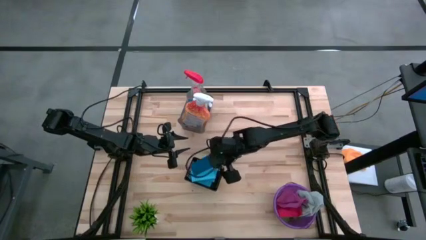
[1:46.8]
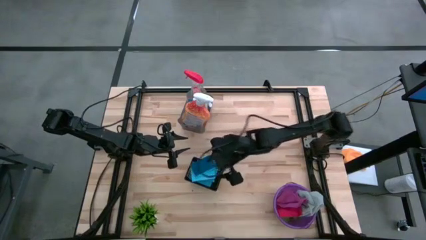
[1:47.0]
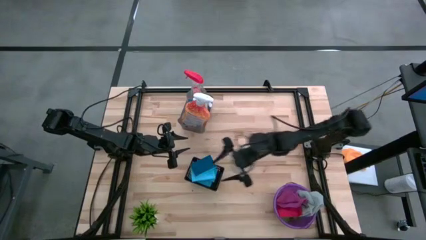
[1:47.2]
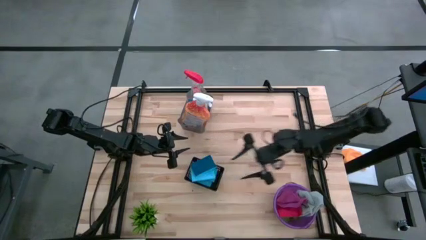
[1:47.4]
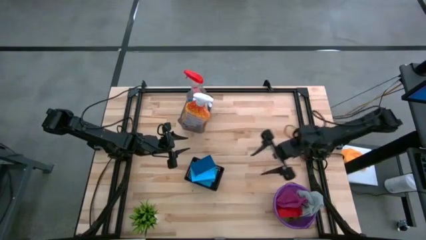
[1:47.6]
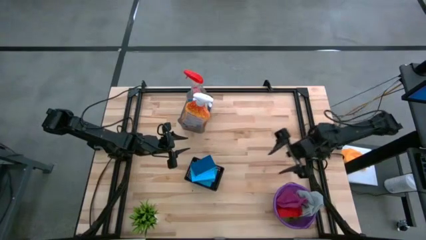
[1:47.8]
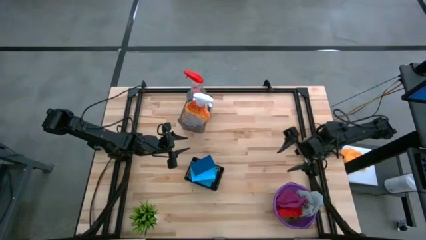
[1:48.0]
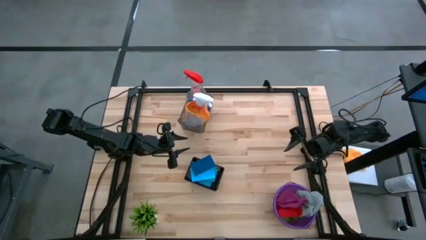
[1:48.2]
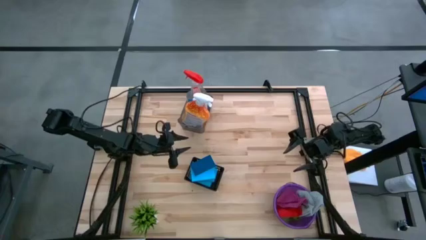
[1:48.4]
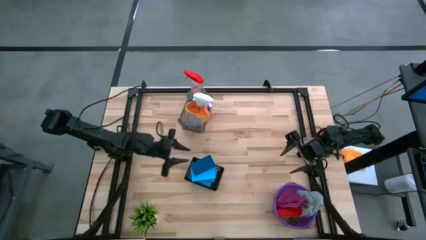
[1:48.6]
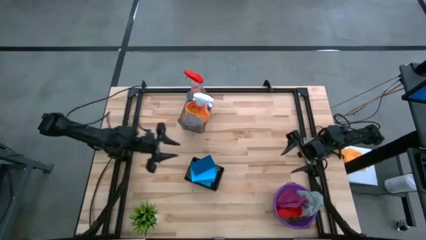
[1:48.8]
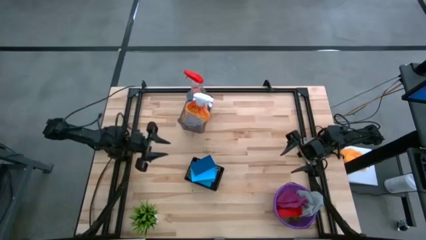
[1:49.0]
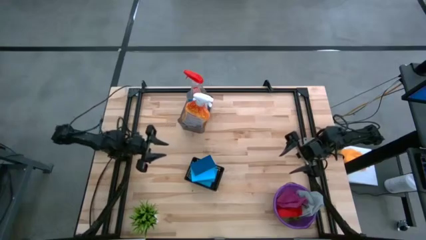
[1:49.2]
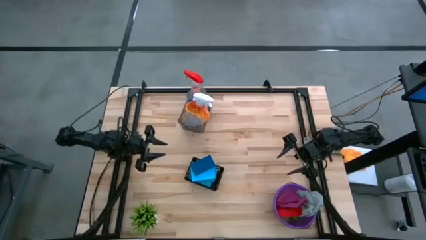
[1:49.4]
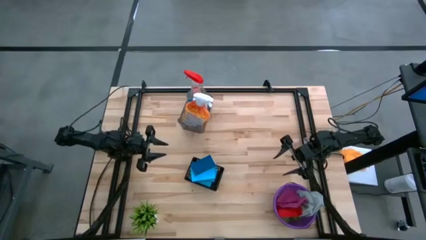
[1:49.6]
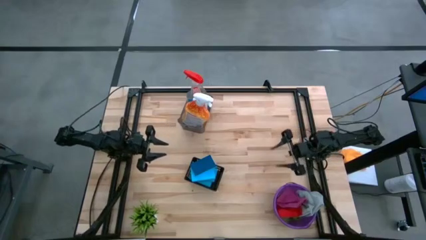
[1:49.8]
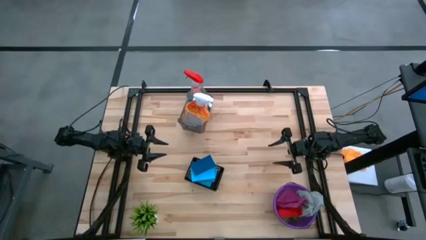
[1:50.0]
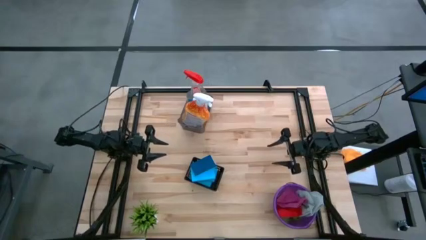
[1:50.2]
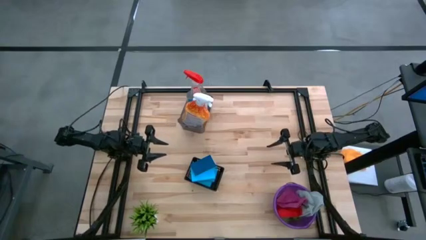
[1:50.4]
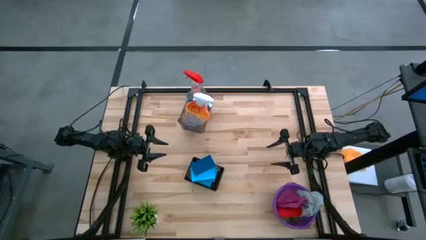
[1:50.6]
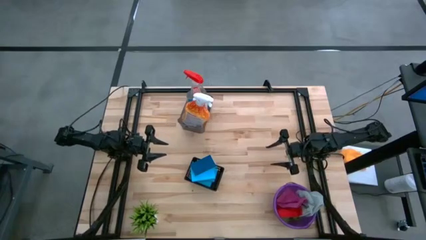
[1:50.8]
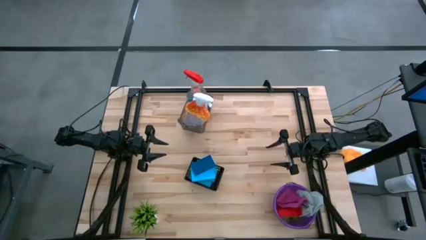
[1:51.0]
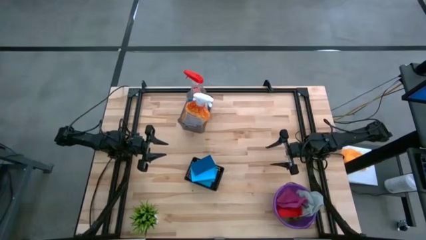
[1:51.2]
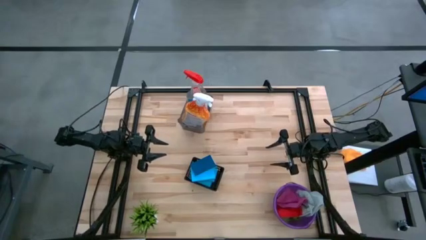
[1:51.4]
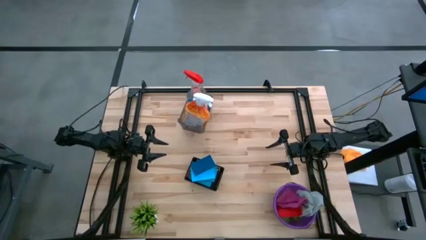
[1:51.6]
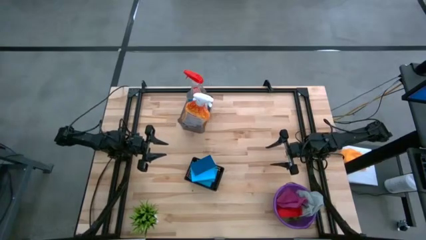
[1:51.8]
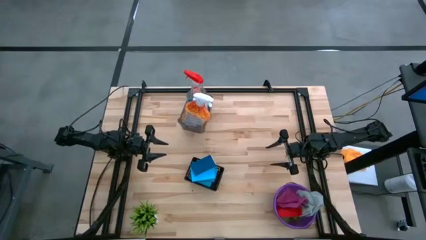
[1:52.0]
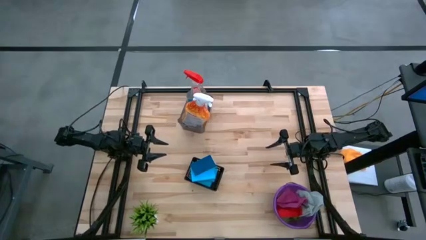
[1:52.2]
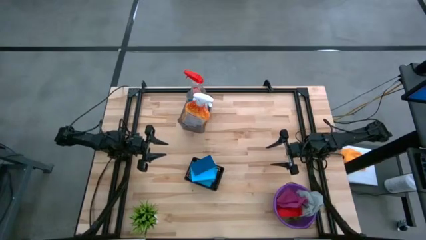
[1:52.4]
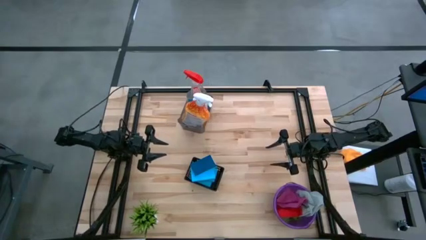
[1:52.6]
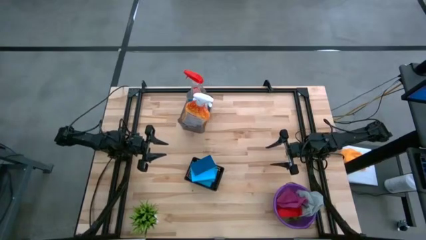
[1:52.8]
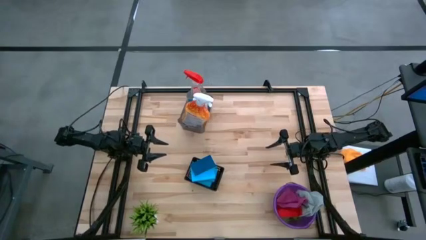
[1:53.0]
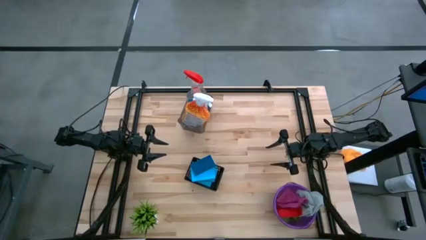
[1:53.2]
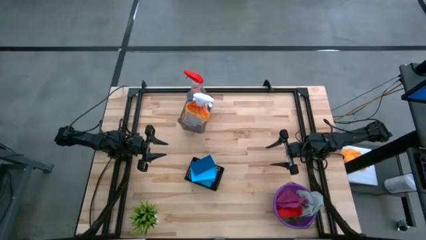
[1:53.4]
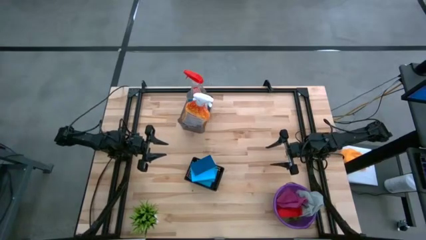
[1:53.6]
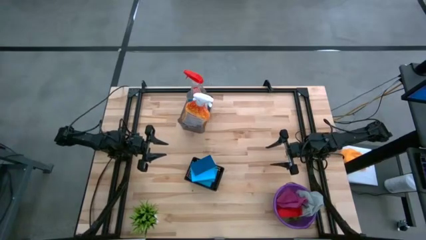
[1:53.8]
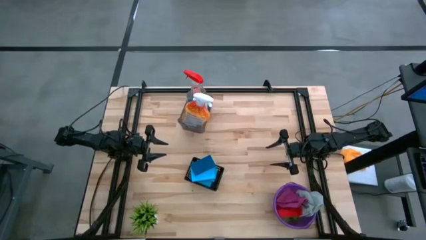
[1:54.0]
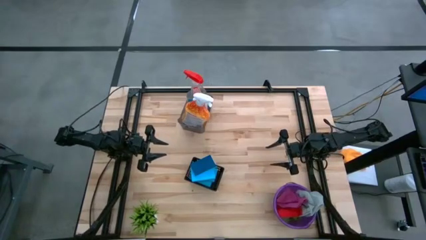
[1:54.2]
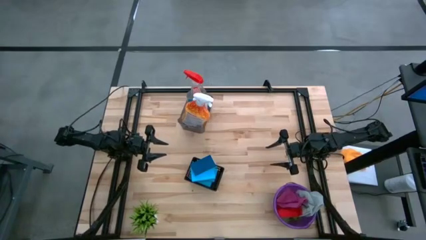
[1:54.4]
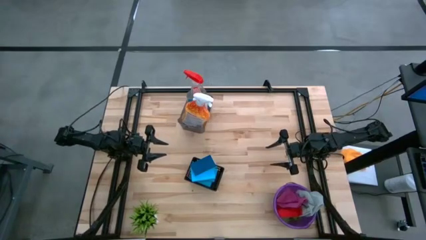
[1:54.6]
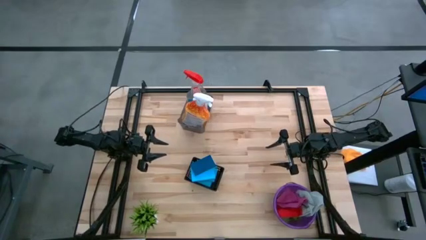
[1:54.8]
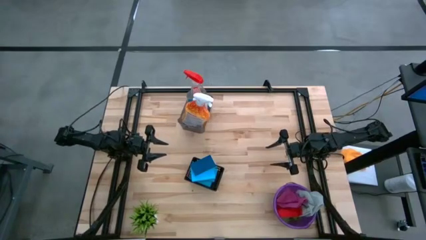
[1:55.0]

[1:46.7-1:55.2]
Task: Pick & Place Kitchen Items
Return to Home Position

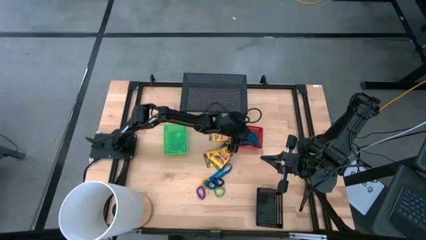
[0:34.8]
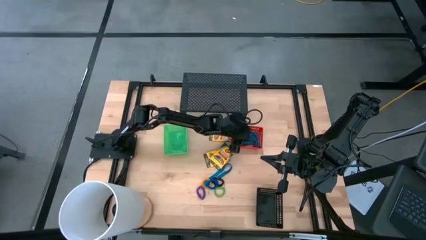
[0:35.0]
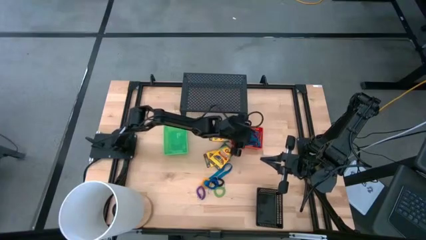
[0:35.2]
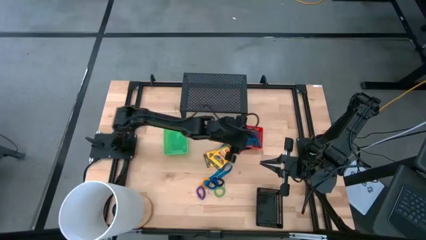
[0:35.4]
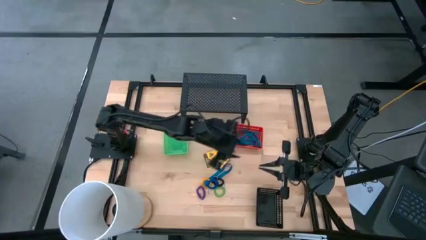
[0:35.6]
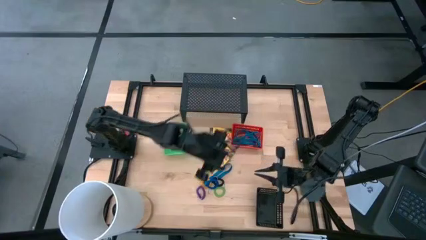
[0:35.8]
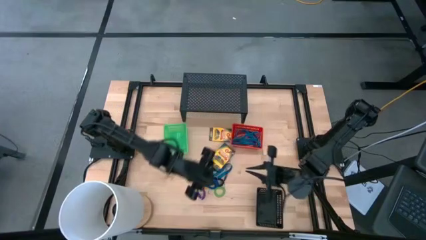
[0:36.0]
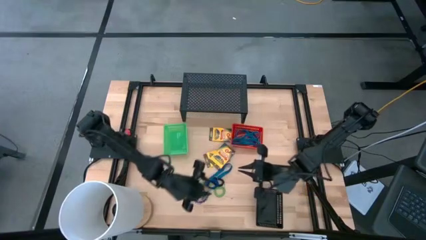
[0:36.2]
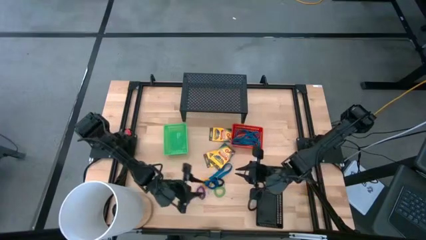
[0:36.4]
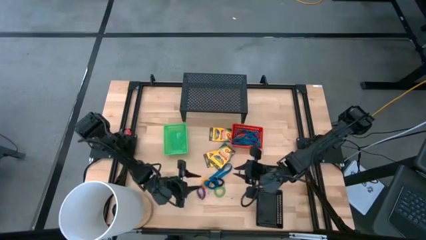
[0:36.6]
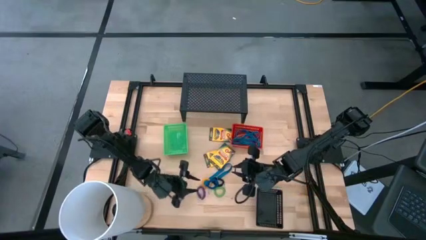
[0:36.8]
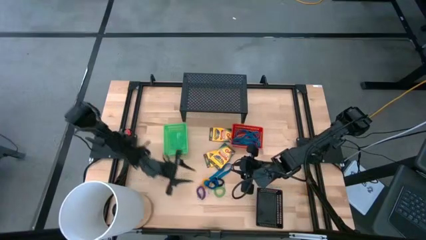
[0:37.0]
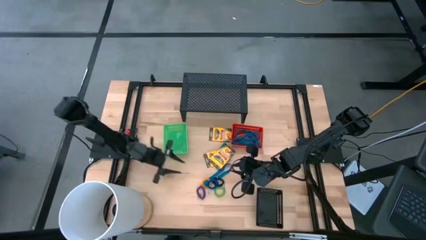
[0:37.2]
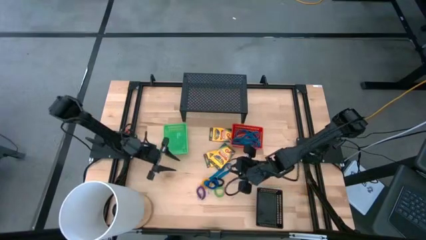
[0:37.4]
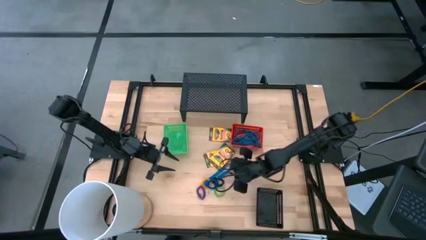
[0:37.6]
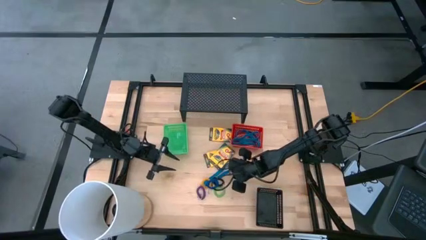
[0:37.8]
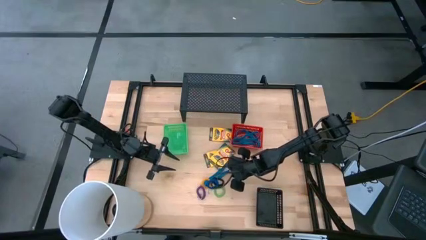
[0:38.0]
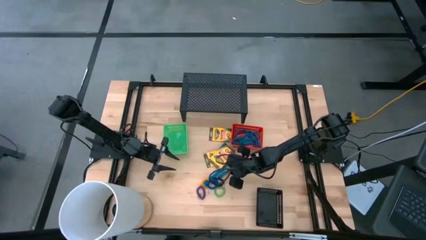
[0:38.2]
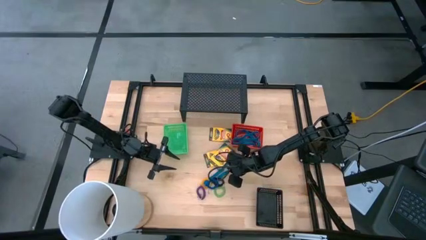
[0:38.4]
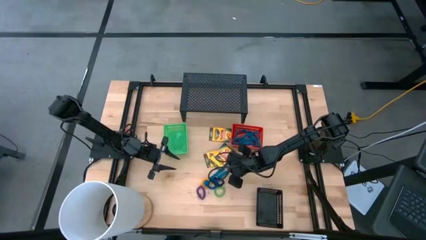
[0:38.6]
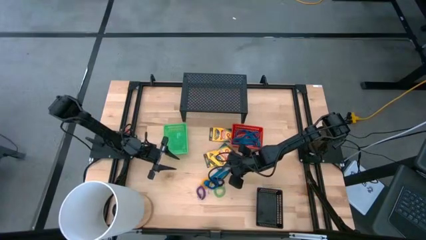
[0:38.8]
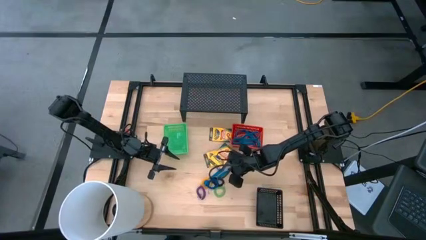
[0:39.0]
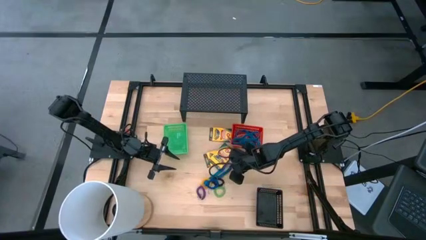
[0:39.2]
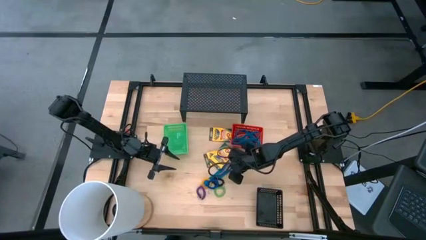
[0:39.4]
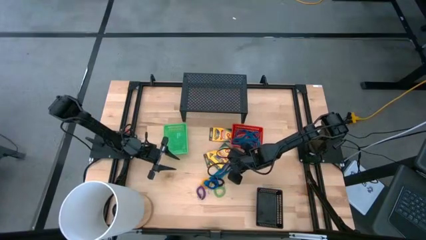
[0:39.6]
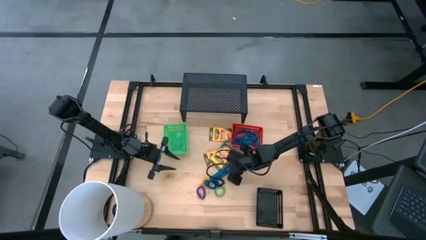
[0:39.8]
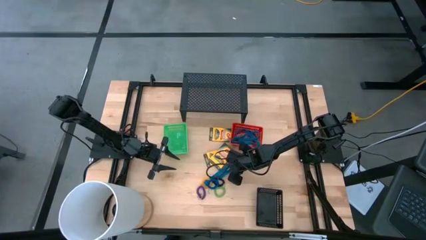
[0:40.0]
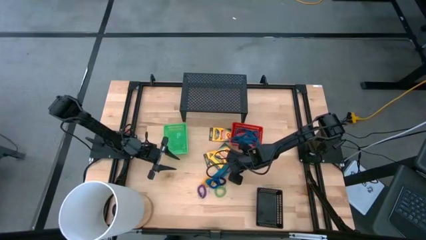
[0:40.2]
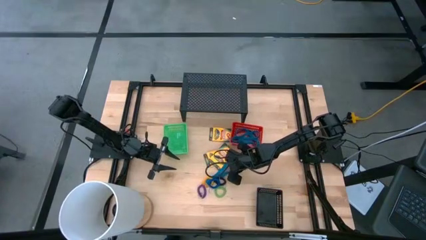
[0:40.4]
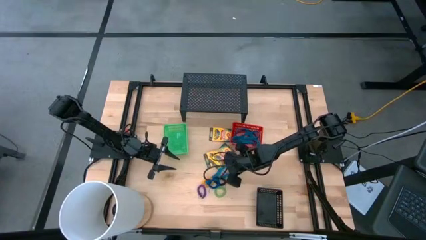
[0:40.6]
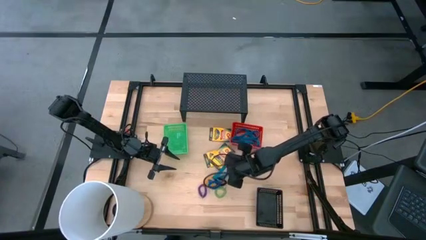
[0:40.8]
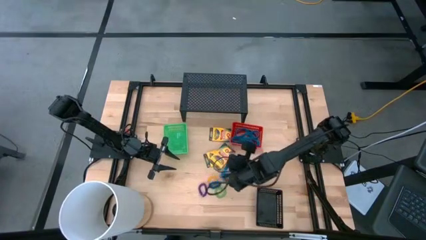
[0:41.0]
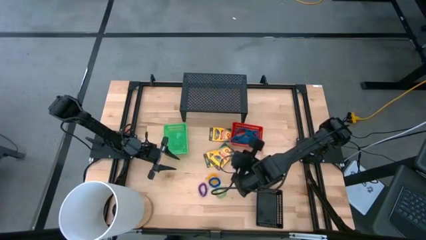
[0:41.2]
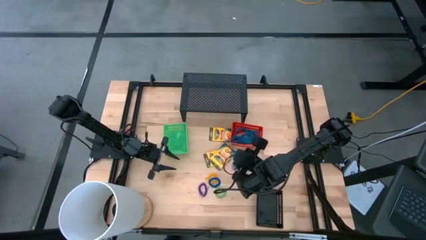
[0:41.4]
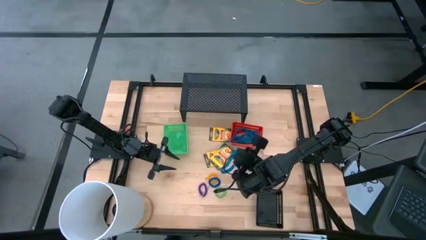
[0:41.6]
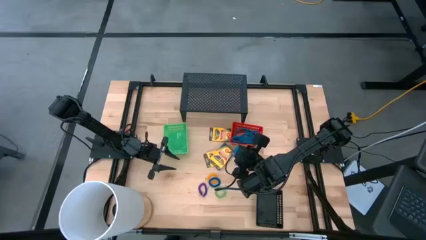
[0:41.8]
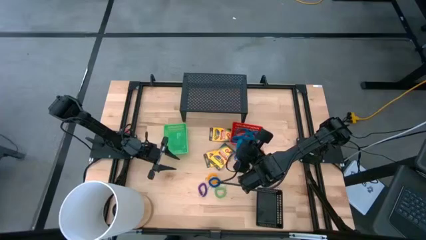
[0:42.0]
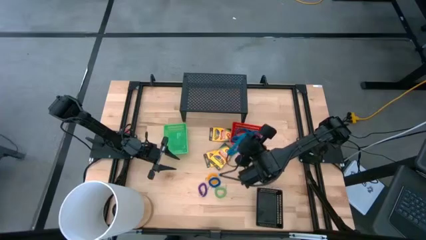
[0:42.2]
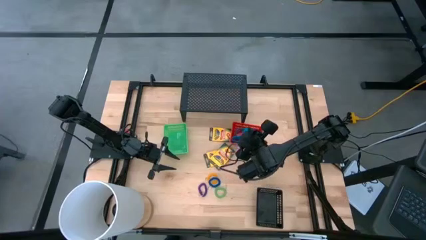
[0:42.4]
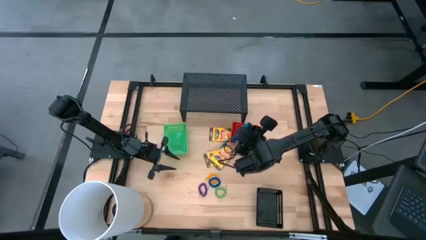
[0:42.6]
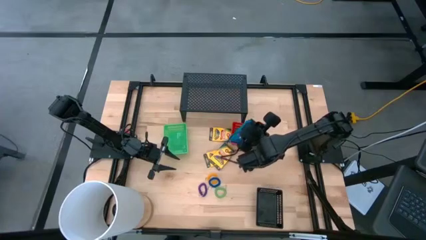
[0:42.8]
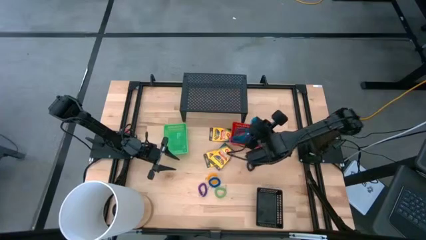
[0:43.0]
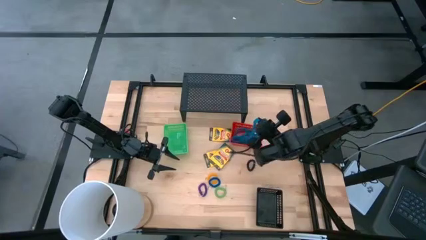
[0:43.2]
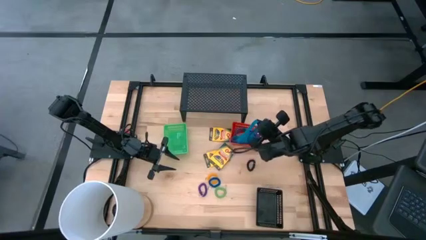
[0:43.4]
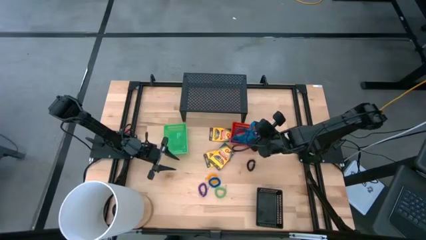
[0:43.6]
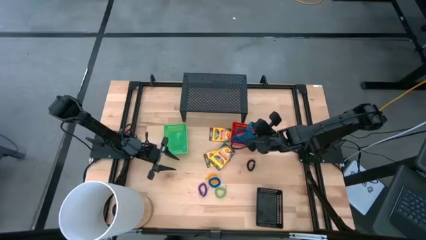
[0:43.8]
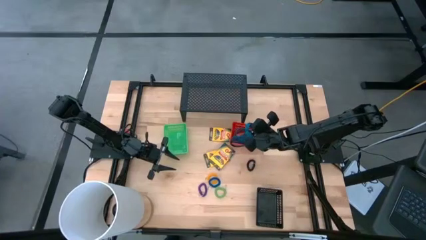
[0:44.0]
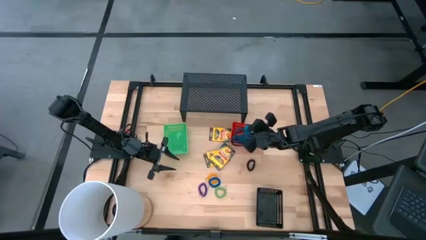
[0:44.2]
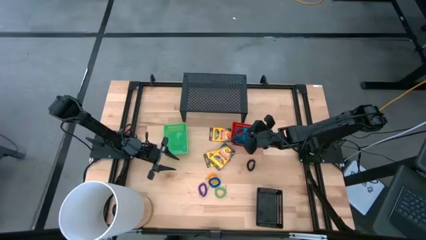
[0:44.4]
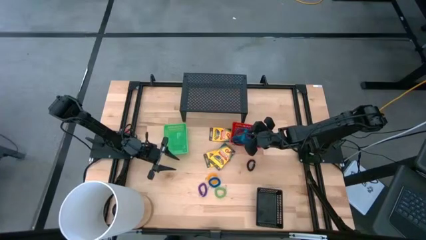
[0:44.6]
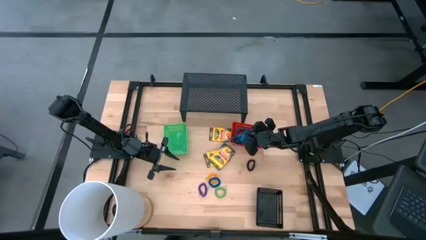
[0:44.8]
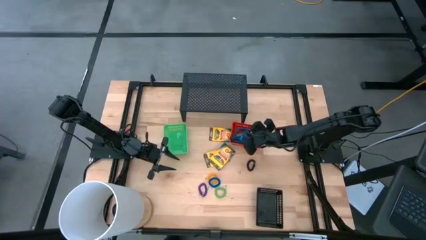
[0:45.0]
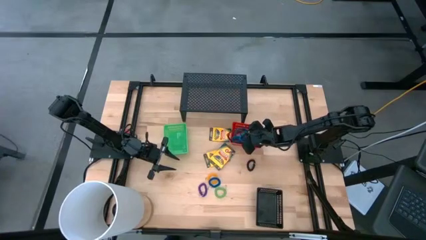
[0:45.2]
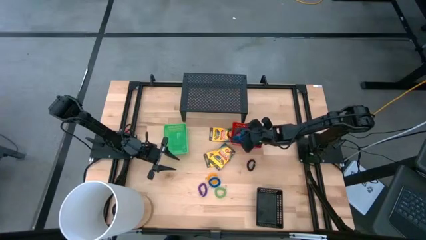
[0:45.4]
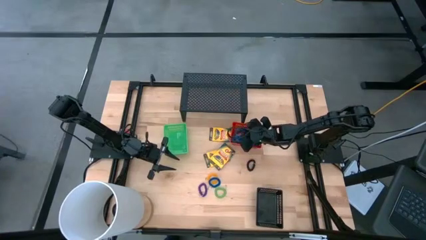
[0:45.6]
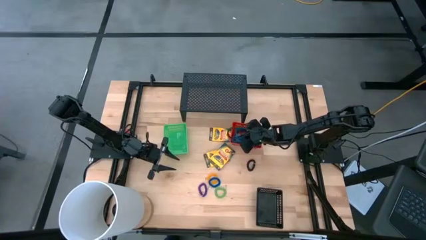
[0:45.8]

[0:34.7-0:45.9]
Task: Pick & Place Office Desk Supplies
Put the blue rubber band into the red bin
